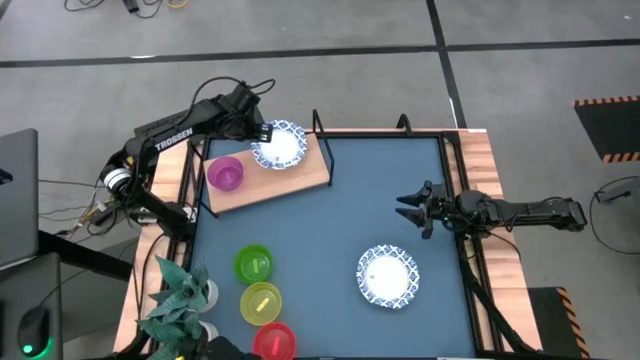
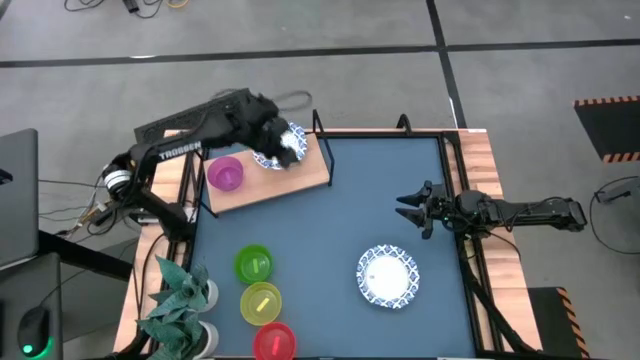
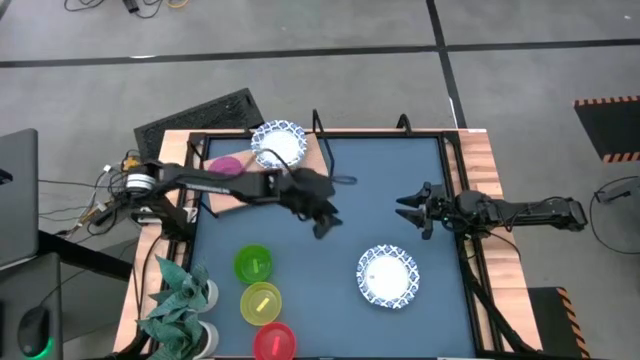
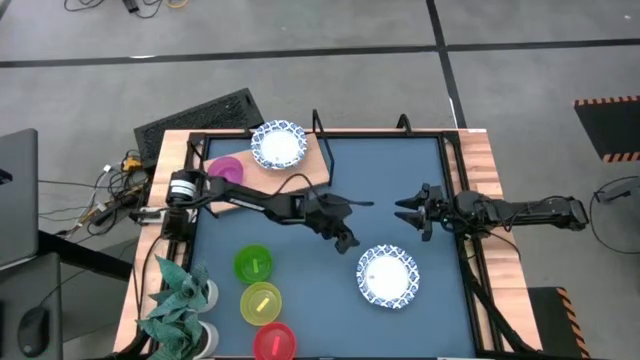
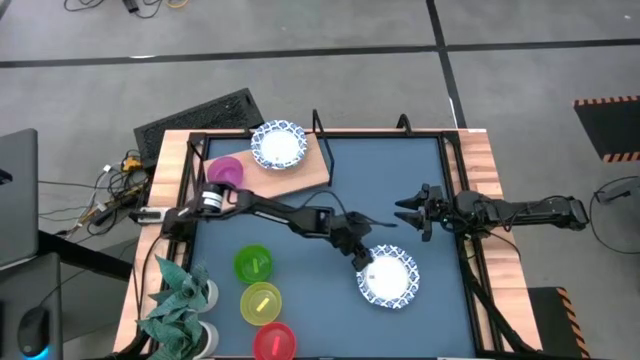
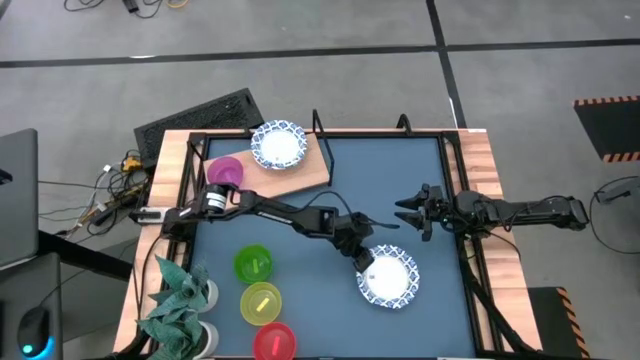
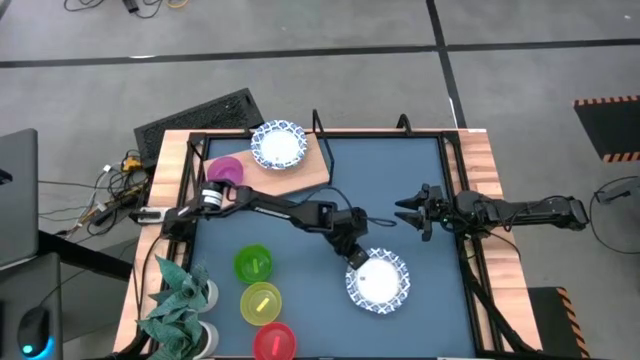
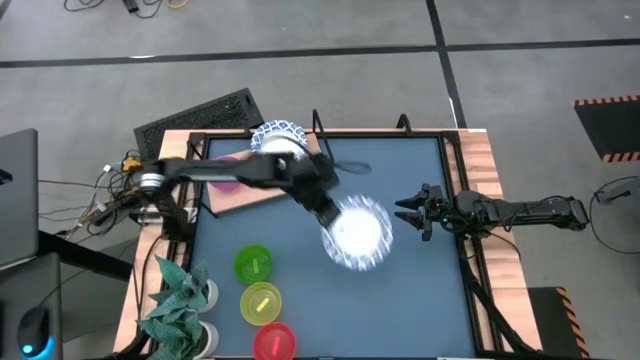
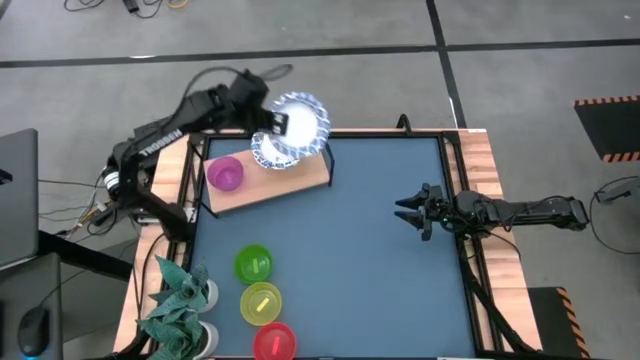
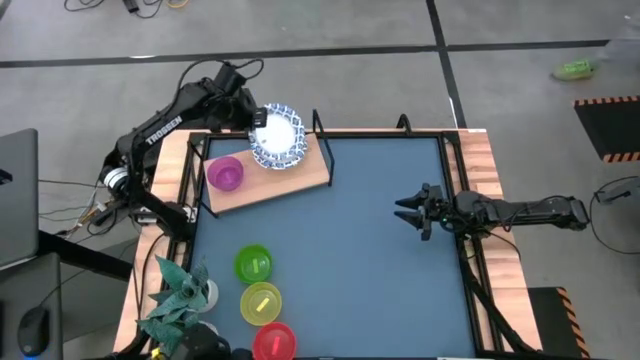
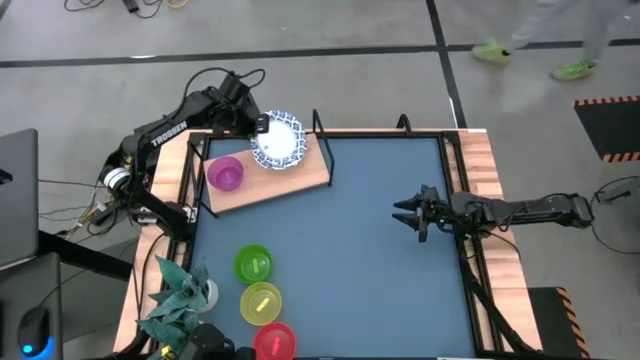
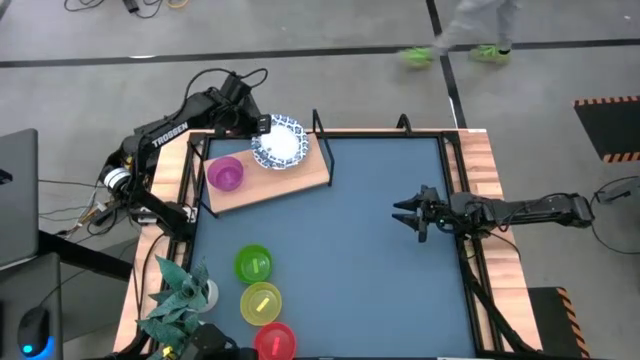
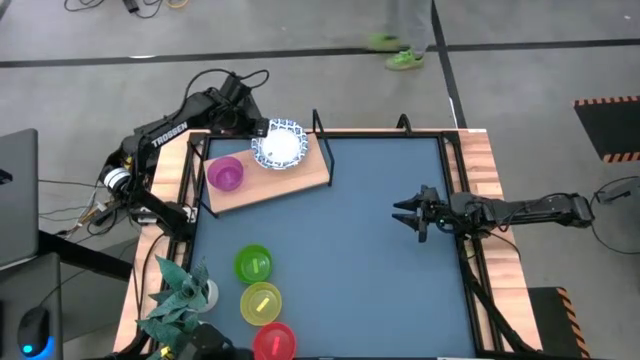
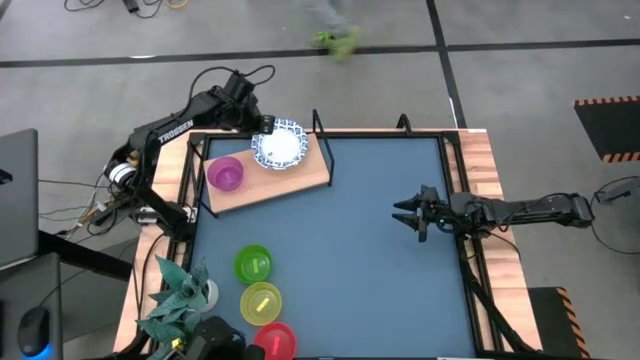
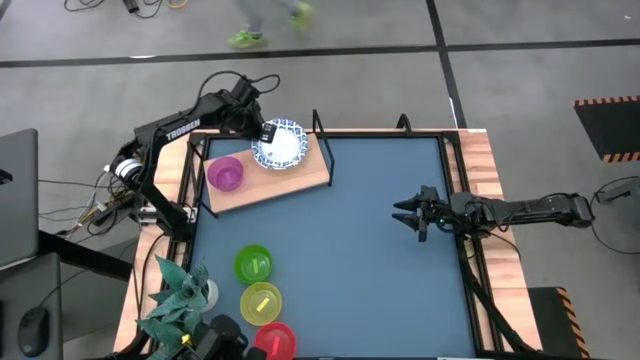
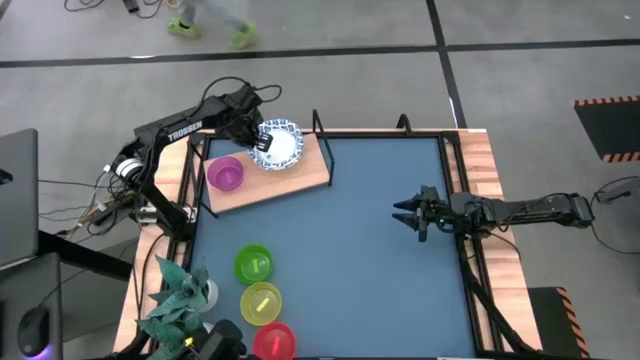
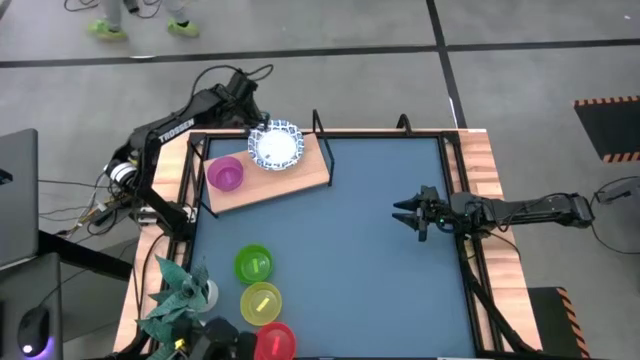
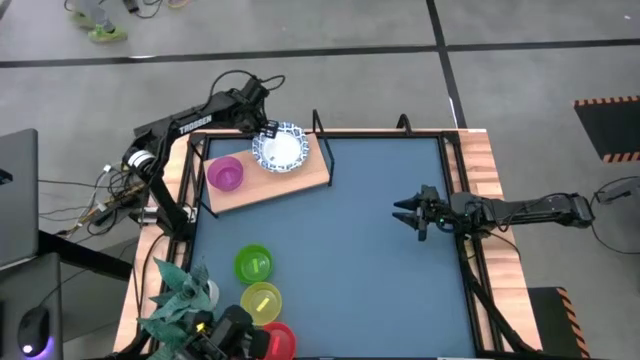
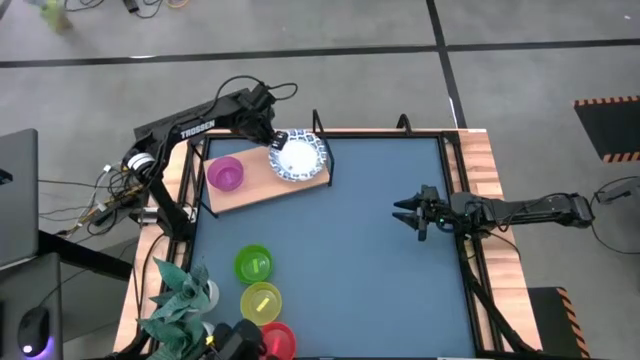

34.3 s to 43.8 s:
Task: Place and stack bowls onto a shelf
Stack the white-blue bowl on top of the other white-blue bowls on the shelf

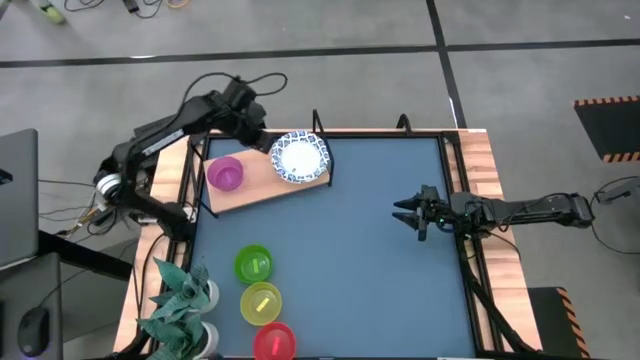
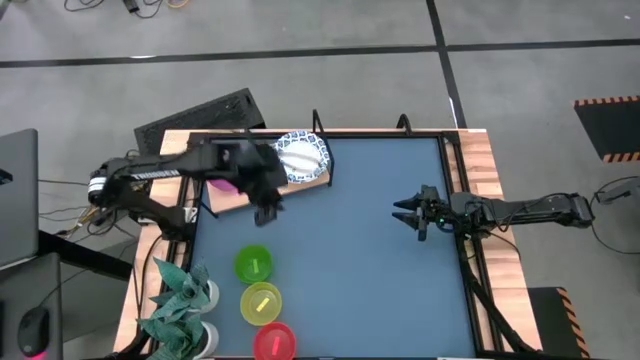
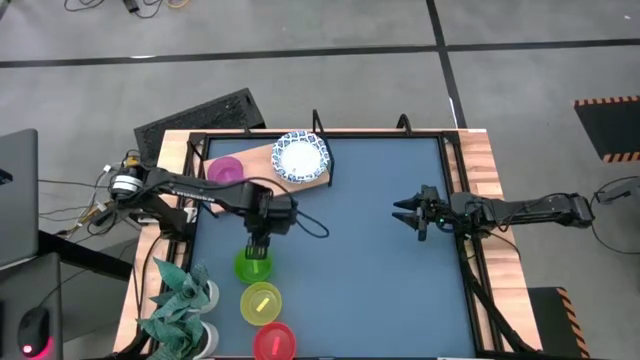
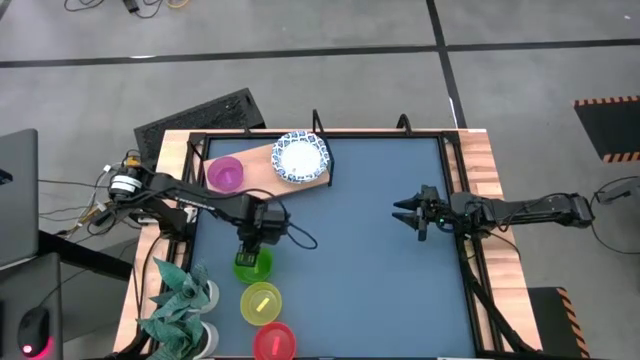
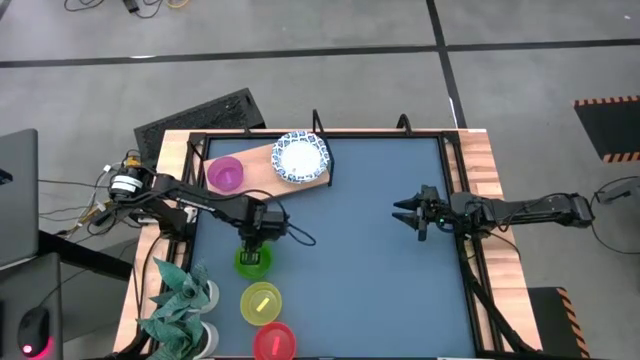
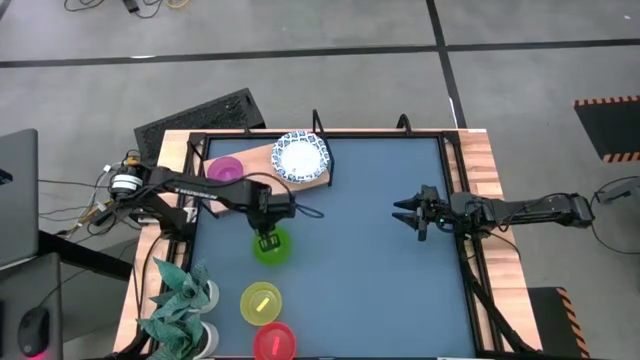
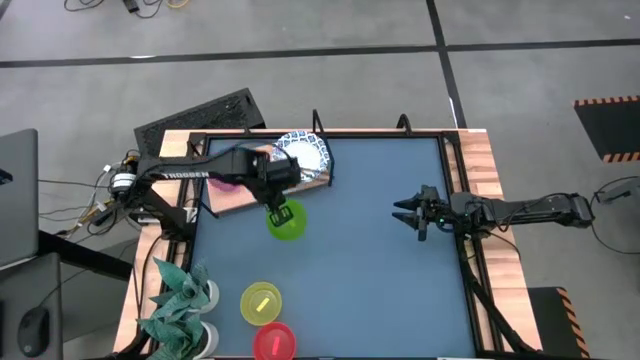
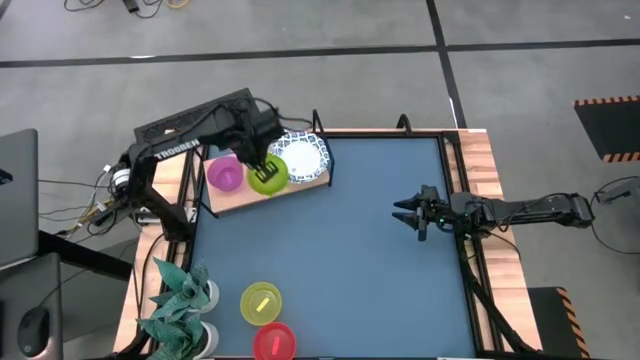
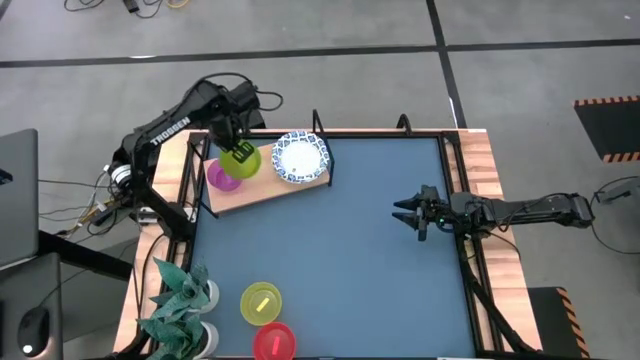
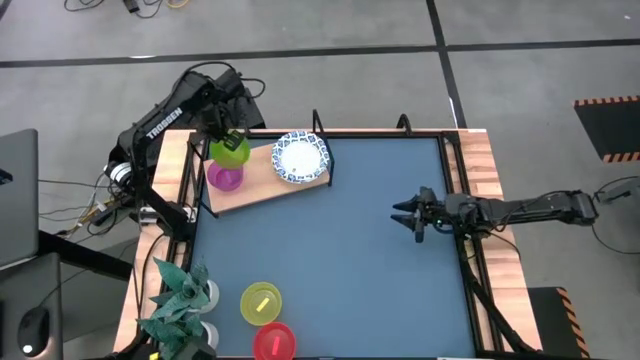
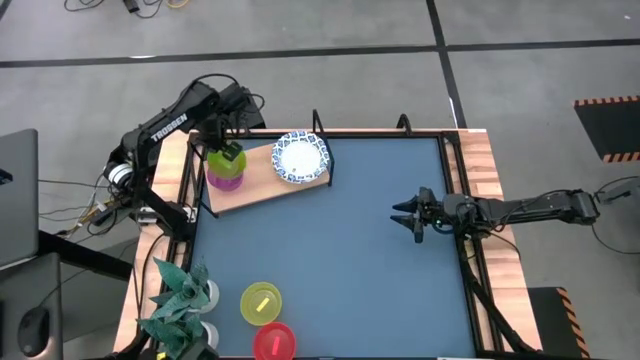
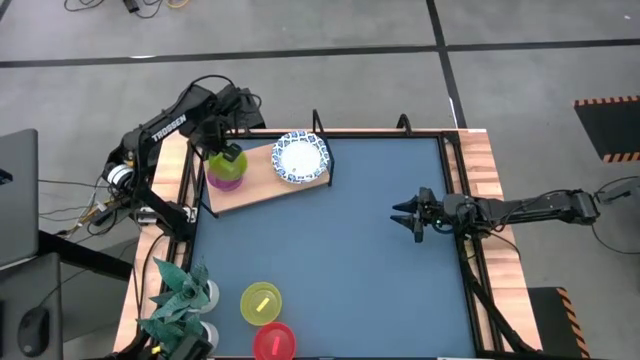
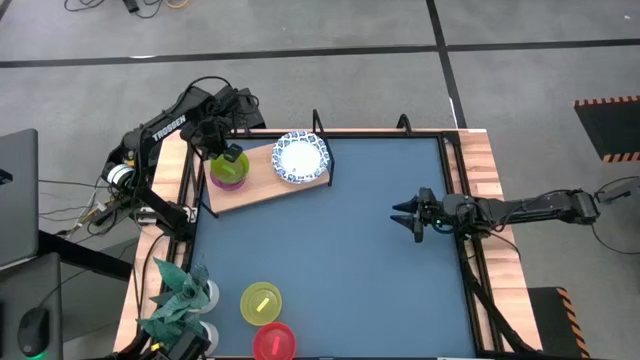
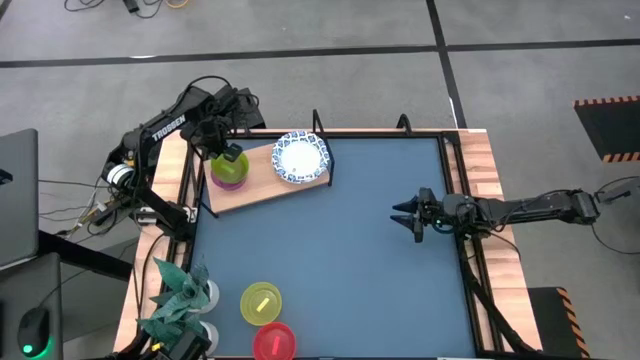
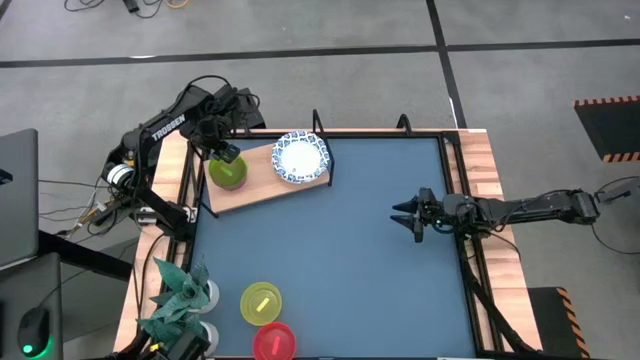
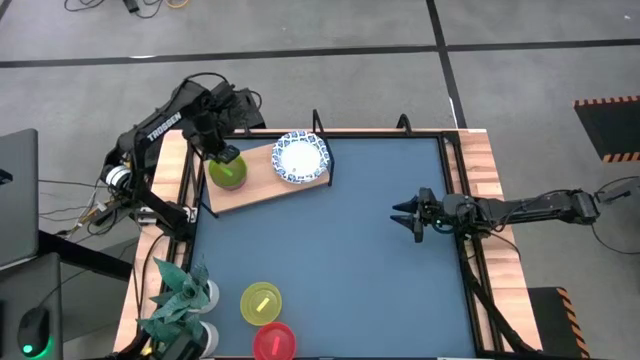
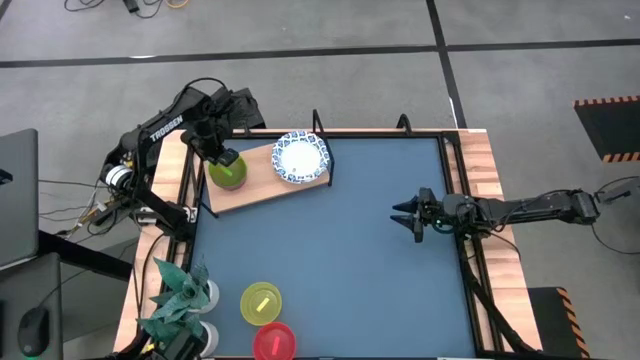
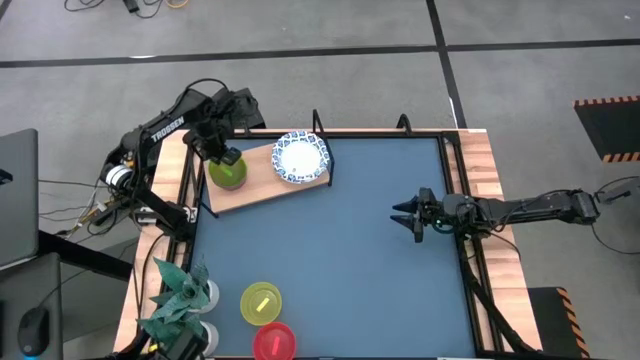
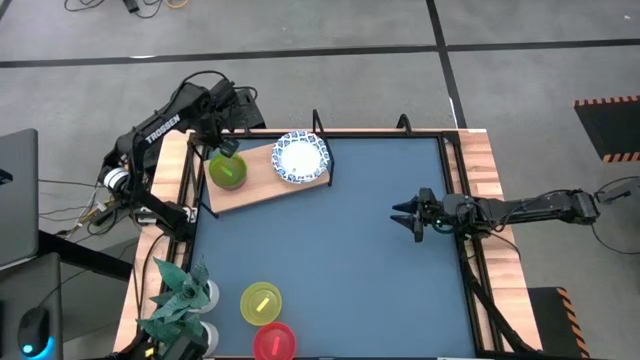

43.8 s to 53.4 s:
Stack the green bowl on top of the other purple bowl on the shelf

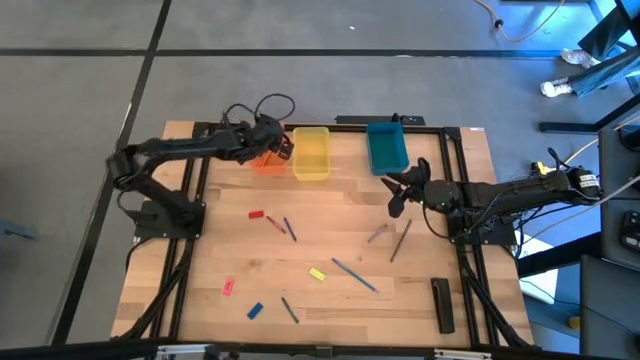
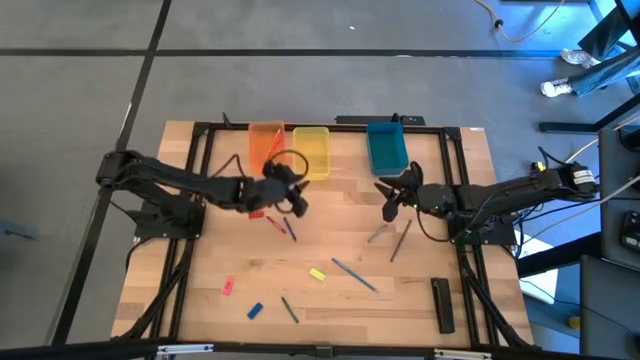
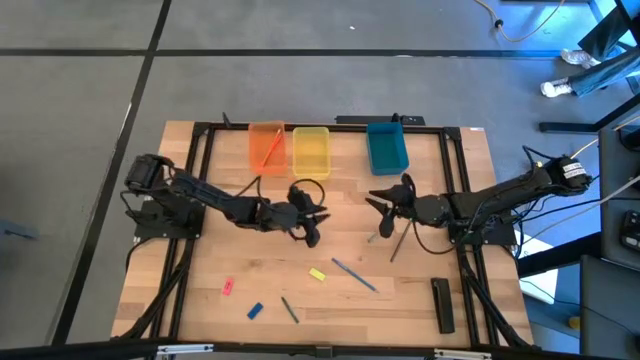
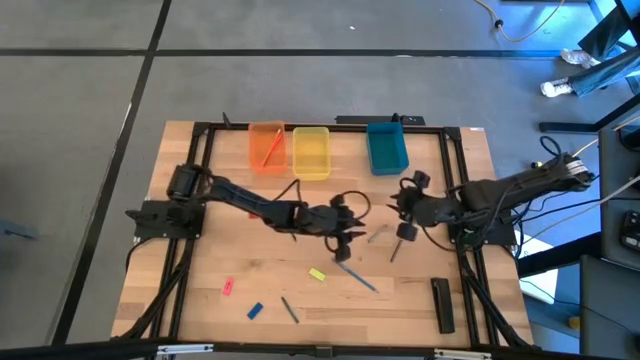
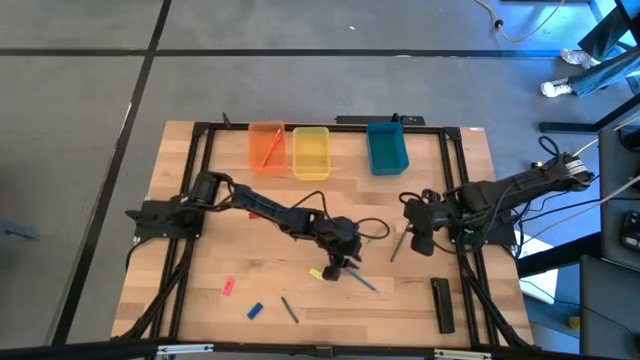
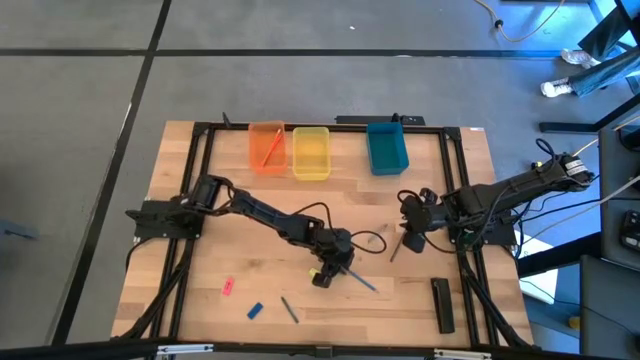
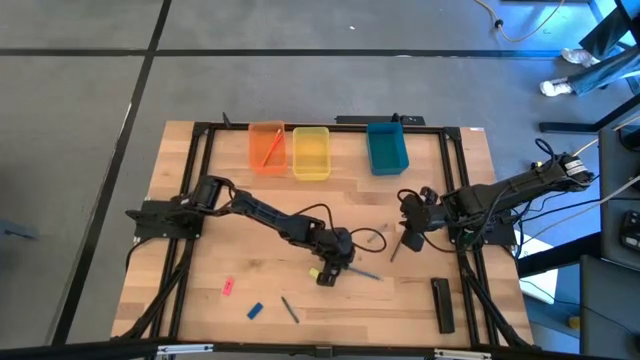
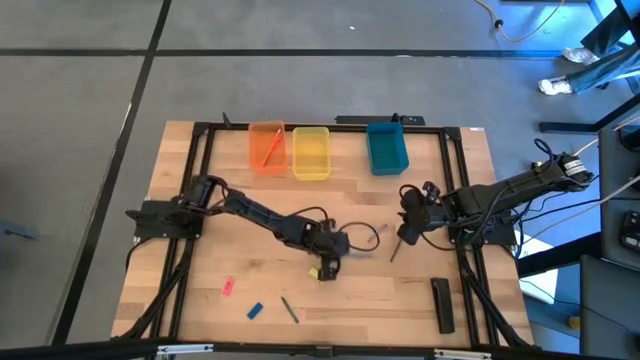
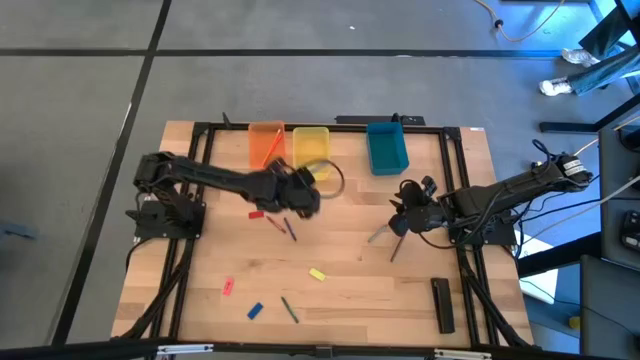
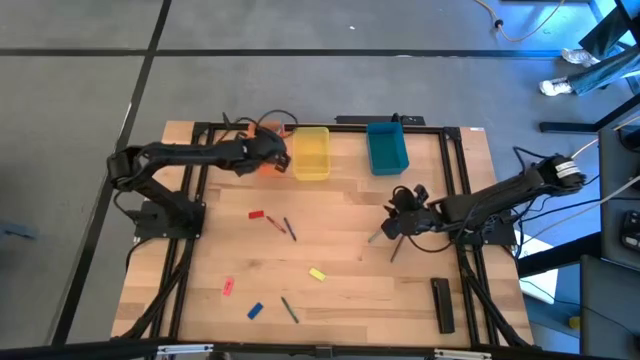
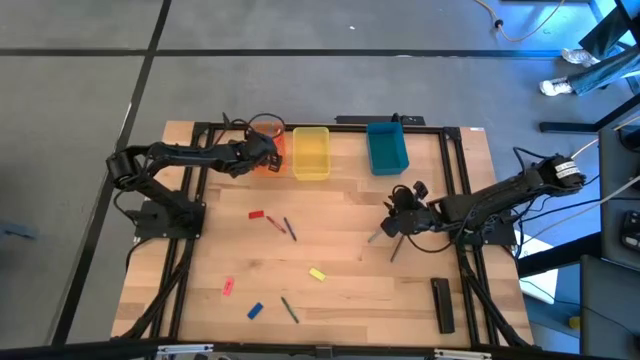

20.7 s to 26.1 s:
Task: Sort crayons/erasers/pens/pencils in bins
Put the blue pencil into the orange bin
